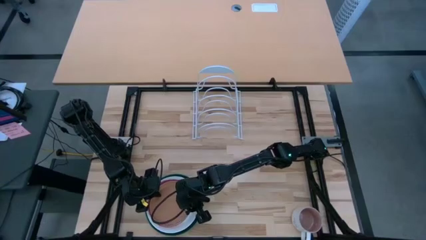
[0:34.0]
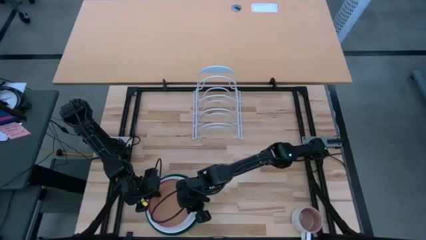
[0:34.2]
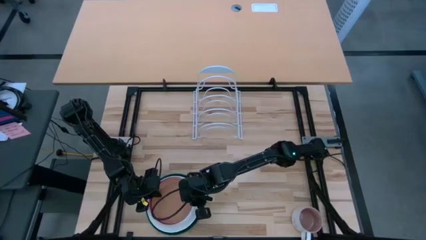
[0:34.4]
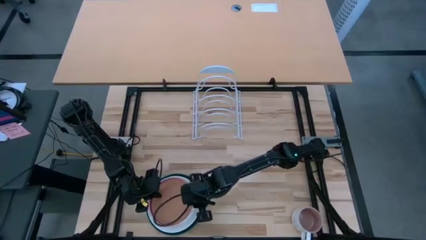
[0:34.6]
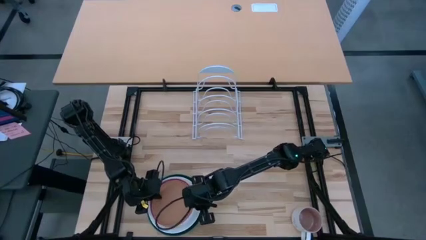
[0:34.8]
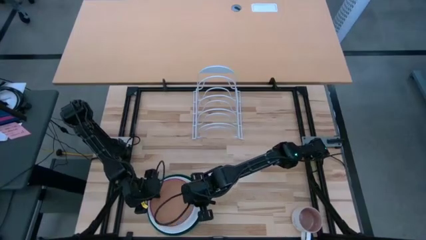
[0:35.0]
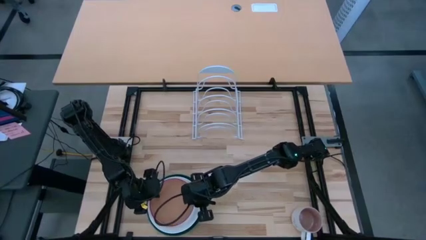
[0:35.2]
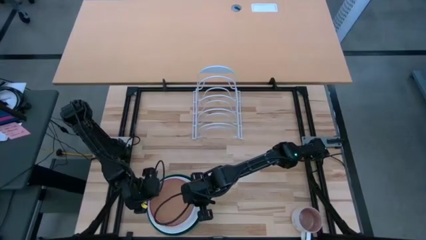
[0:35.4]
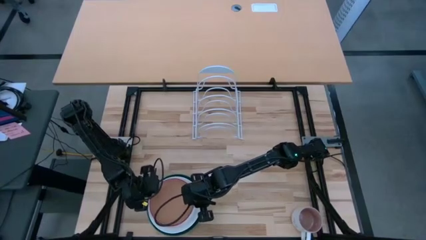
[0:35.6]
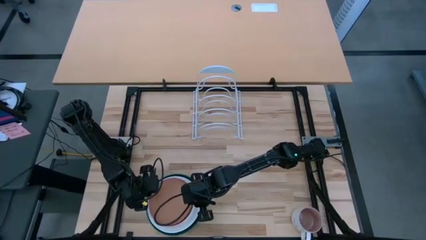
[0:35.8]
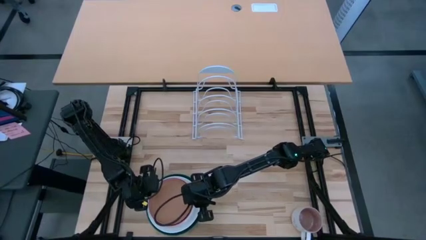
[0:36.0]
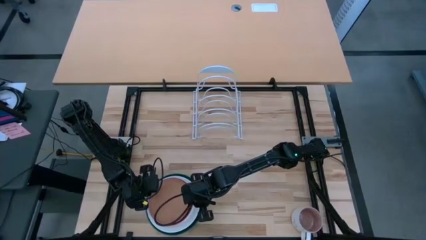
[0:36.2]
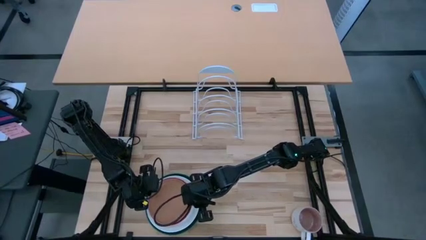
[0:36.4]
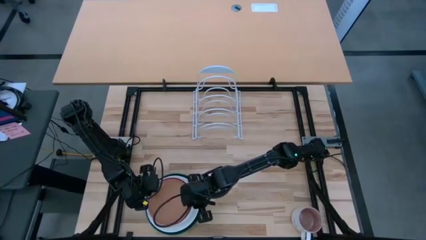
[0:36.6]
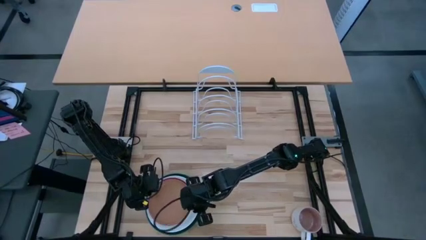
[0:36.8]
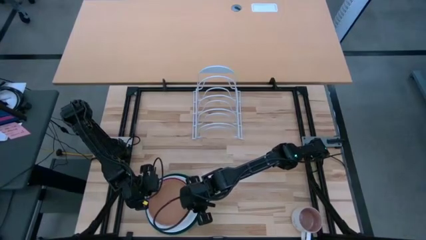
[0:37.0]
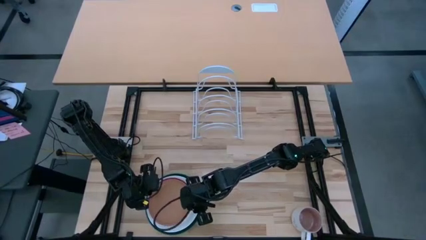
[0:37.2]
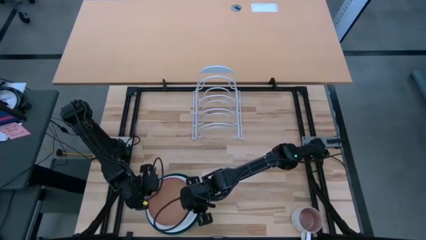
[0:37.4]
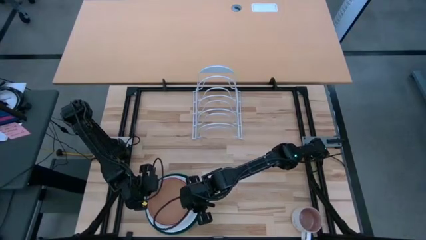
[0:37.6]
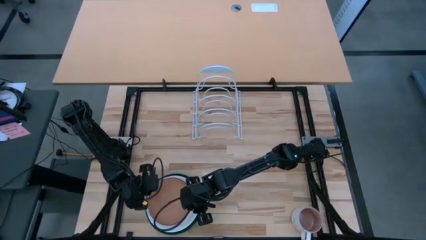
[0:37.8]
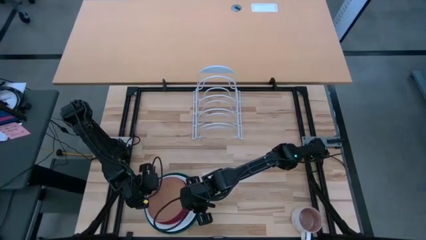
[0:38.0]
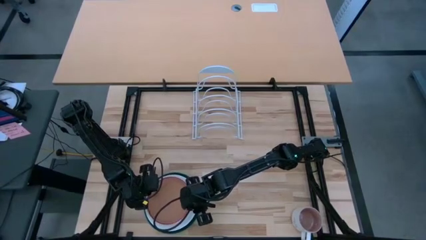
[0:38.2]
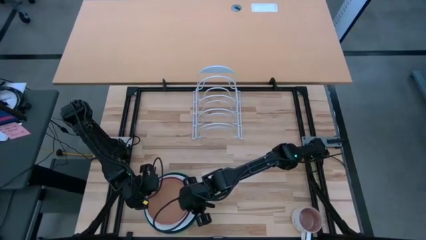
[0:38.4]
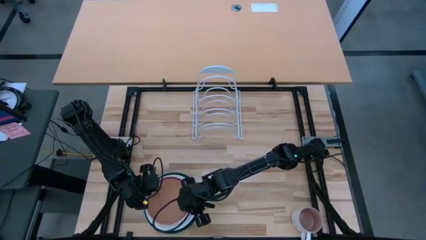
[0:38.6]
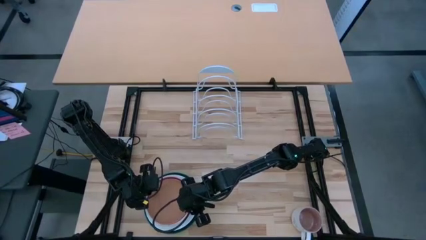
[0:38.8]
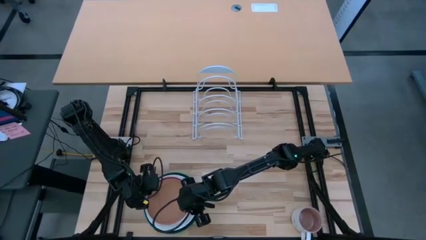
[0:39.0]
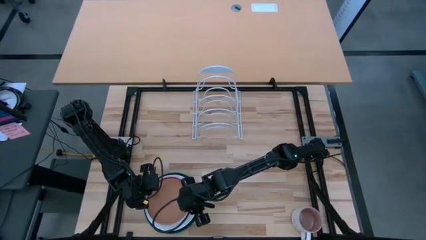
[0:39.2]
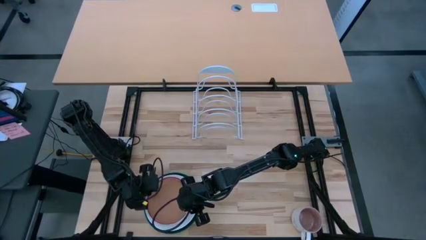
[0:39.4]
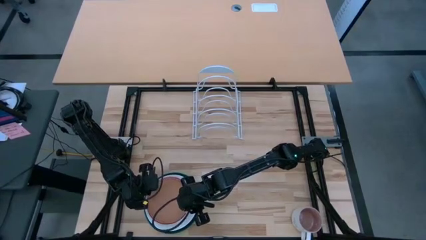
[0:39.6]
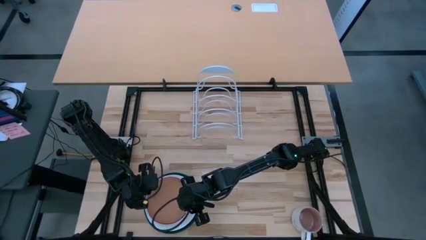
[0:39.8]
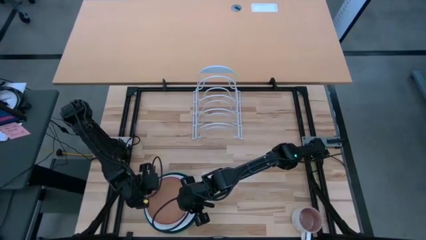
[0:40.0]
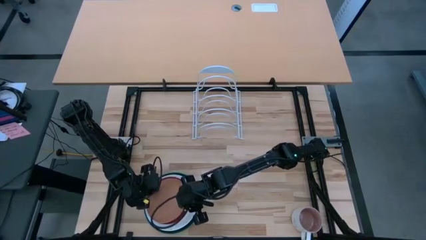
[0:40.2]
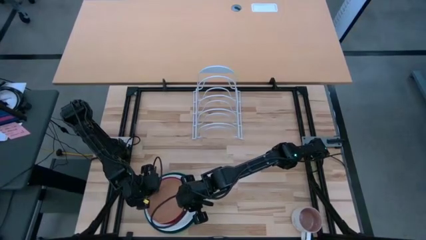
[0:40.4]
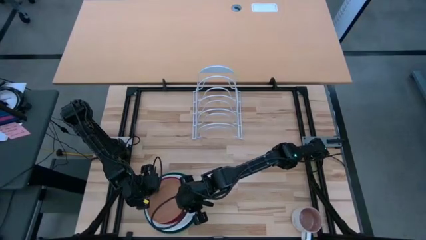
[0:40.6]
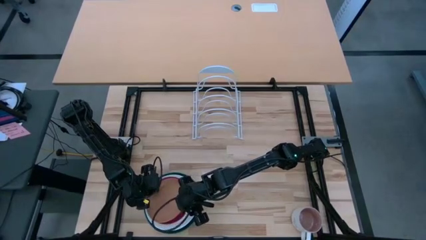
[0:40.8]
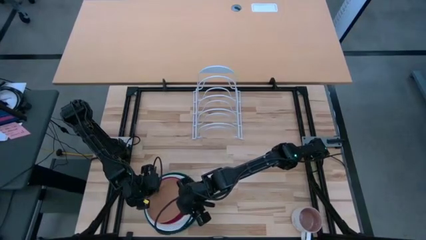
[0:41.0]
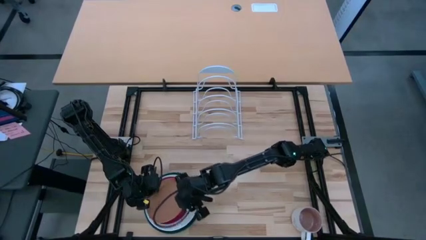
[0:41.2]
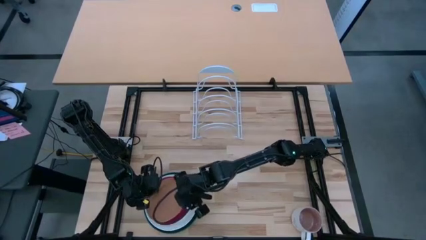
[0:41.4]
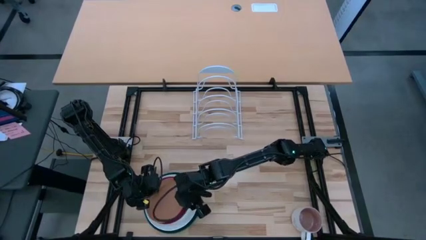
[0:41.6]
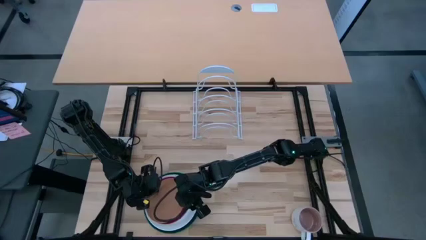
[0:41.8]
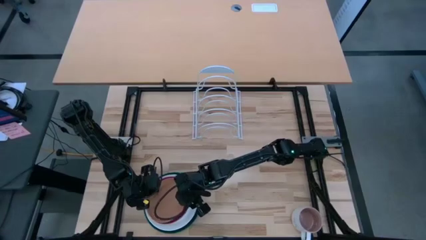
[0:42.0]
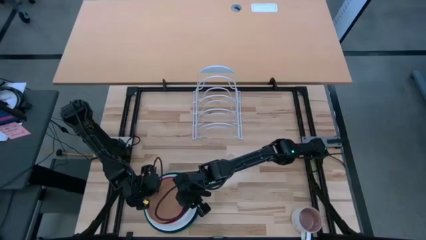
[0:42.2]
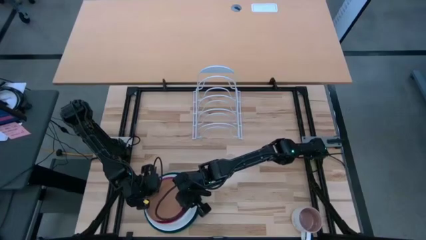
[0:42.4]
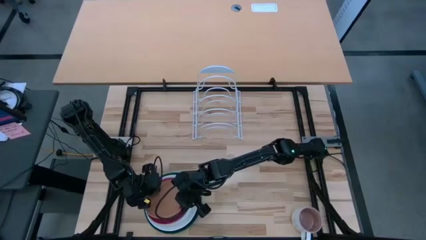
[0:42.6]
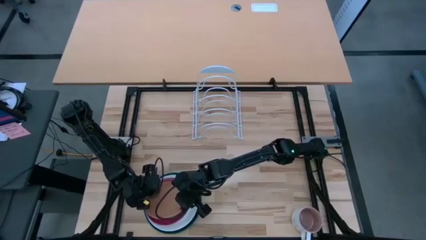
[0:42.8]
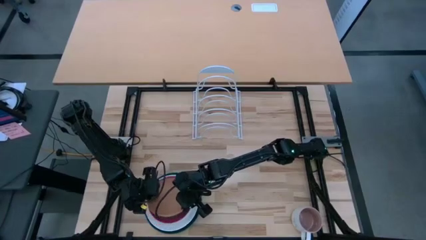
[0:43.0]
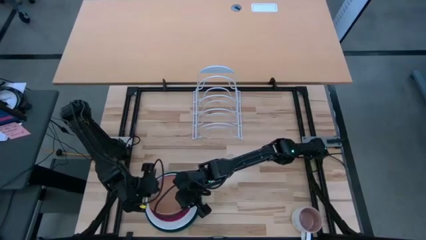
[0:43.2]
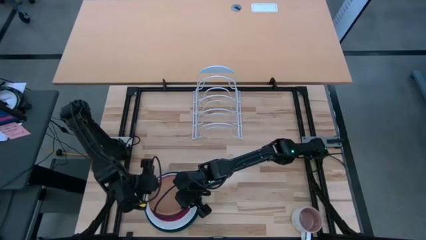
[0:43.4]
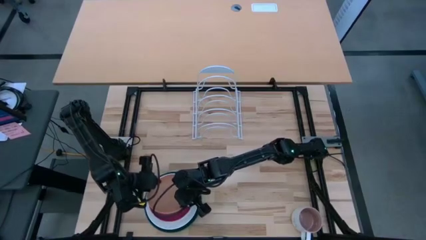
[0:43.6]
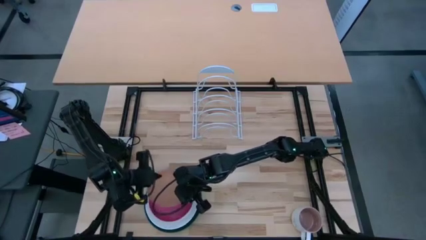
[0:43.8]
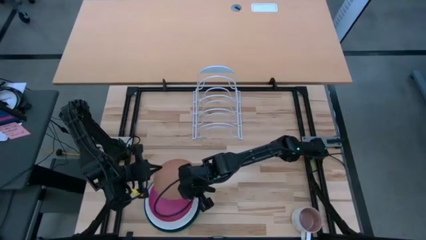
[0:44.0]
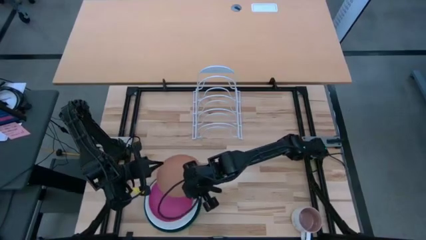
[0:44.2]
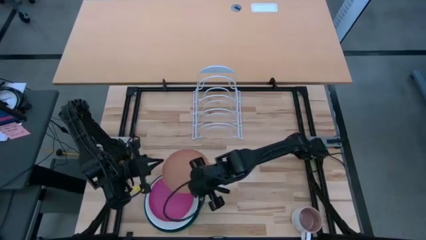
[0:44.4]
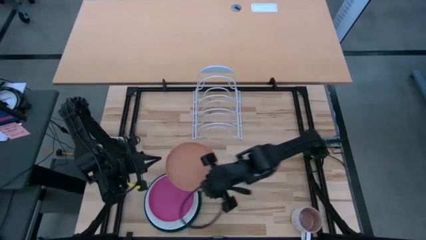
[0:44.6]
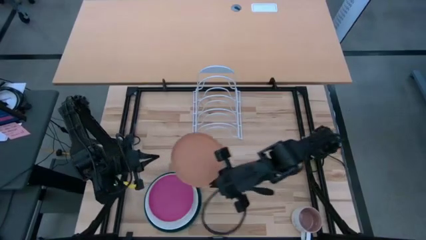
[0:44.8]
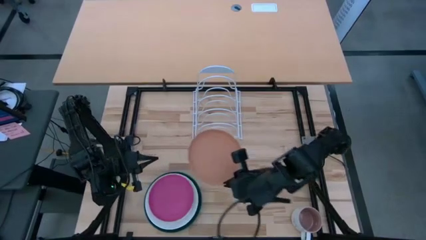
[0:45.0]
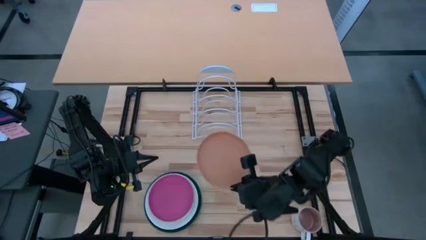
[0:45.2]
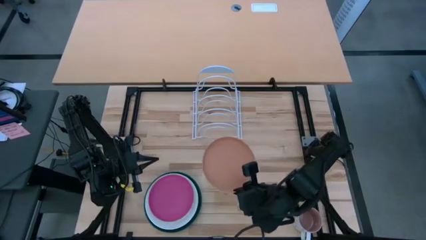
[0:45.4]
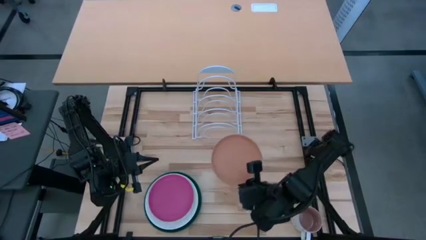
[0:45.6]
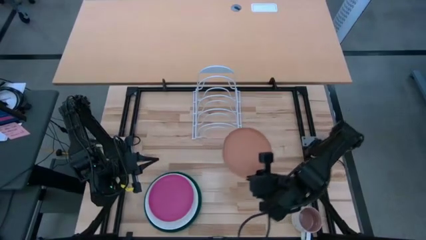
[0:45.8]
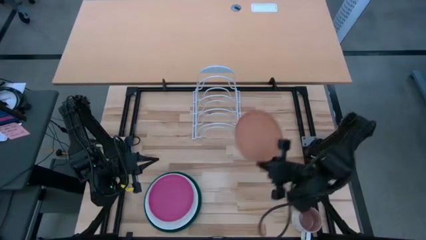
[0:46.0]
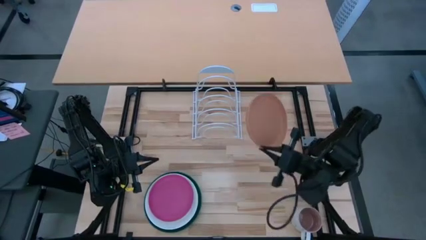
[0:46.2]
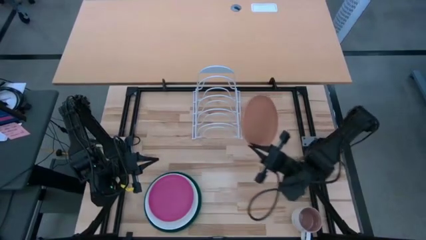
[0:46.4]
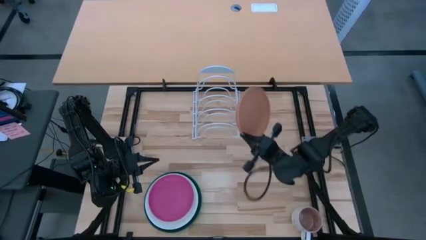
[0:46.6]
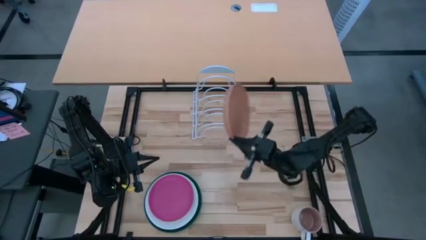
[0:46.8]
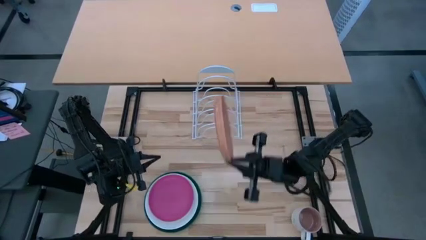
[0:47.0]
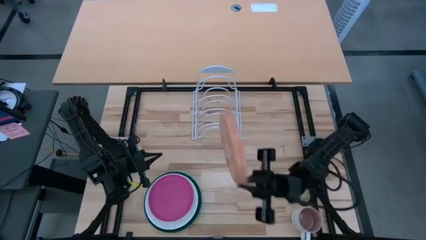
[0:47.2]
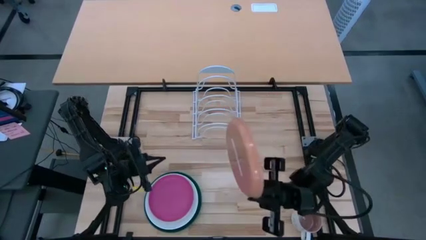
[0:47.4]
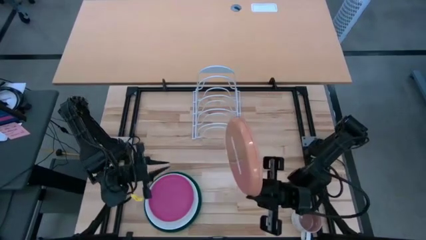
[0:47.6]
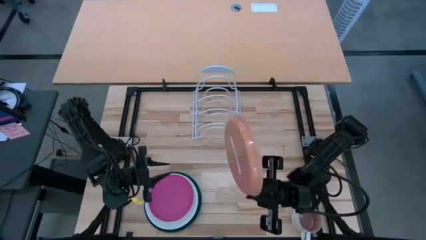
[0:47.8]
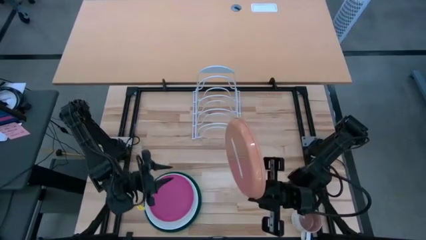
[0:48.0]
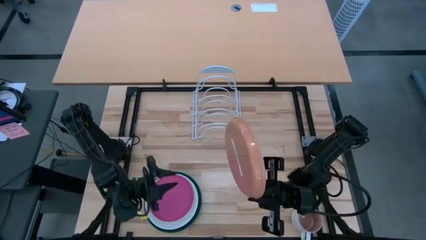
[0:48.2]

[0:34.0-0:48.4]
Task: Sort dishes
Put the orange plate on the dish rack
